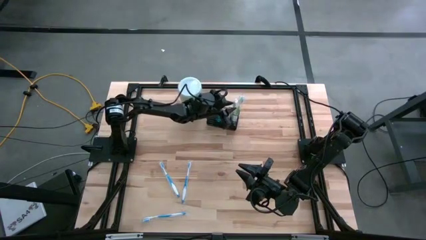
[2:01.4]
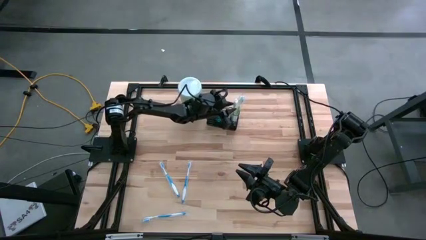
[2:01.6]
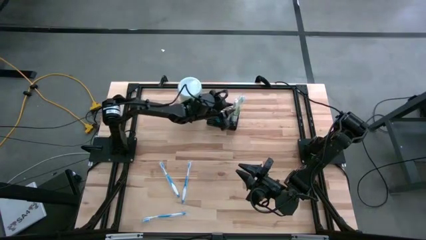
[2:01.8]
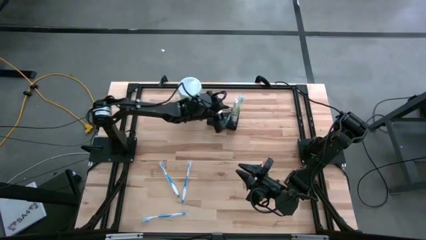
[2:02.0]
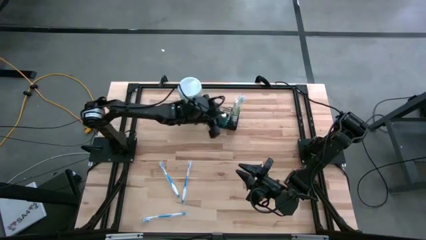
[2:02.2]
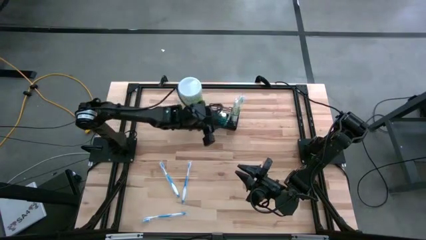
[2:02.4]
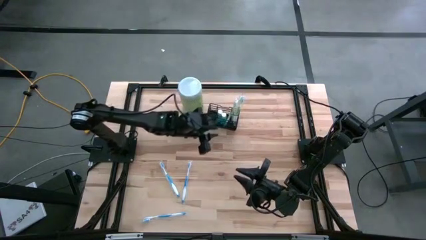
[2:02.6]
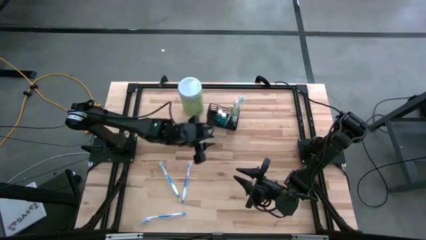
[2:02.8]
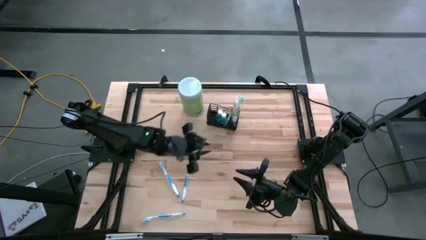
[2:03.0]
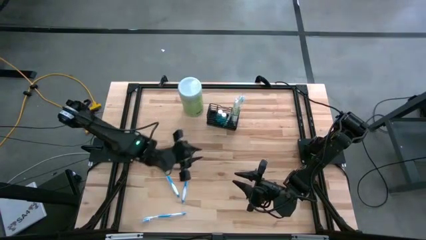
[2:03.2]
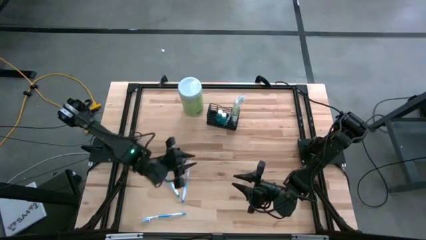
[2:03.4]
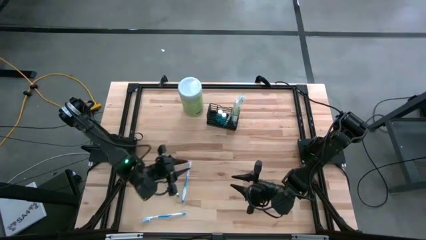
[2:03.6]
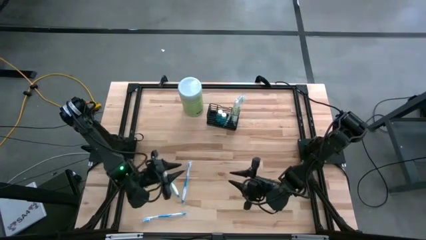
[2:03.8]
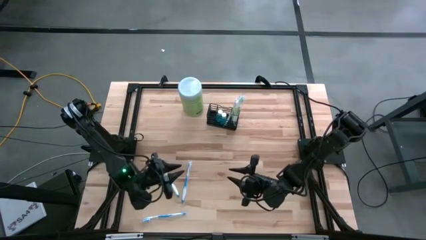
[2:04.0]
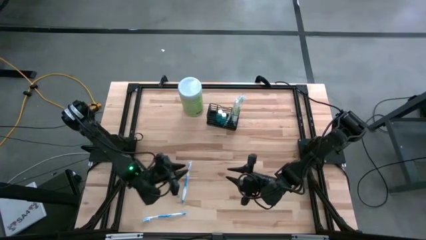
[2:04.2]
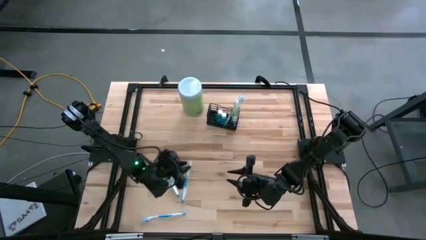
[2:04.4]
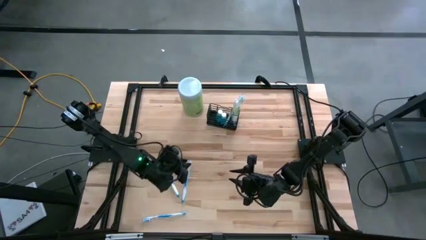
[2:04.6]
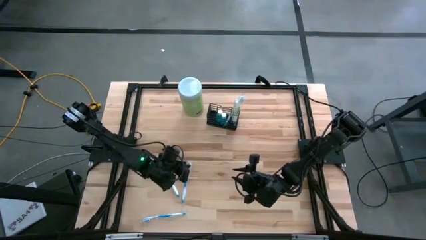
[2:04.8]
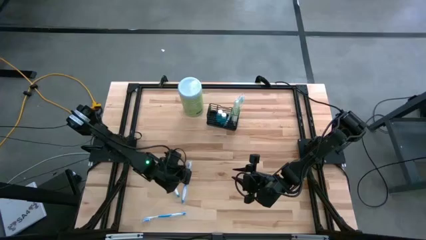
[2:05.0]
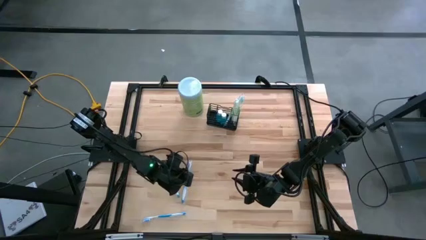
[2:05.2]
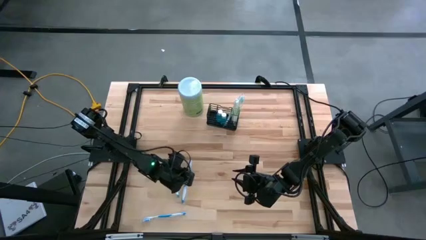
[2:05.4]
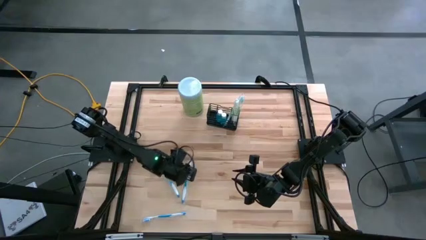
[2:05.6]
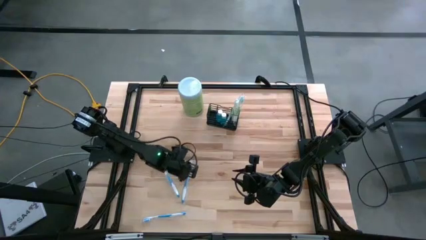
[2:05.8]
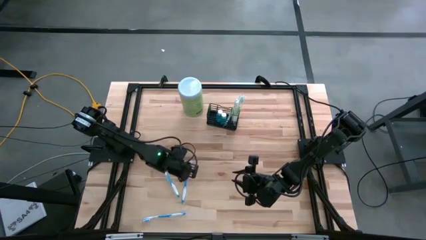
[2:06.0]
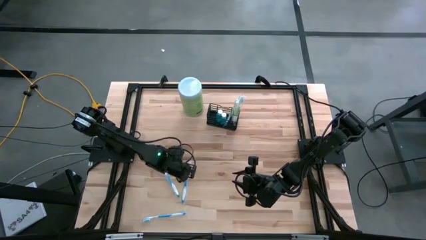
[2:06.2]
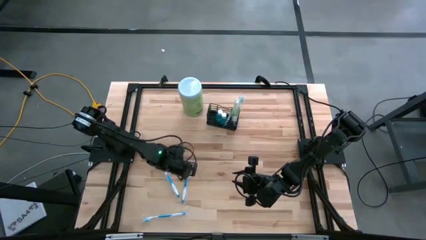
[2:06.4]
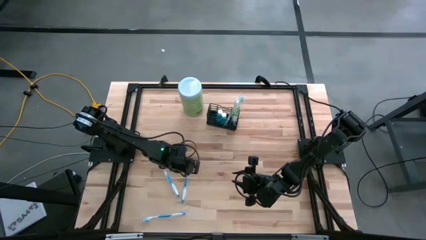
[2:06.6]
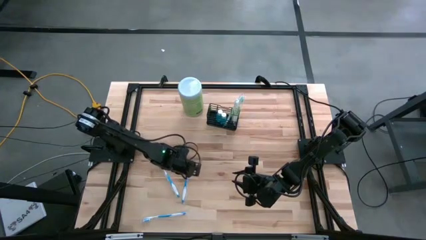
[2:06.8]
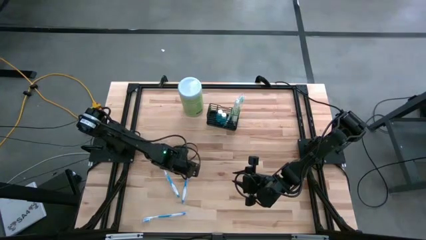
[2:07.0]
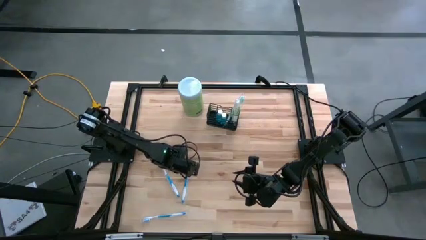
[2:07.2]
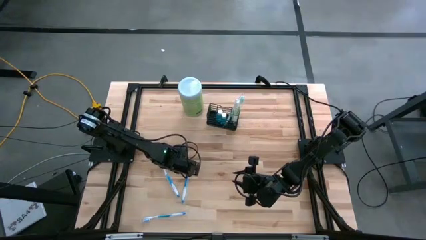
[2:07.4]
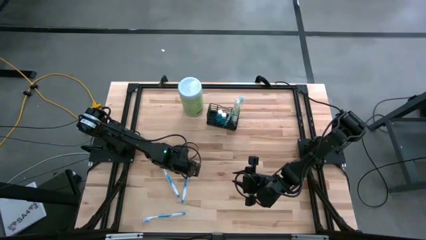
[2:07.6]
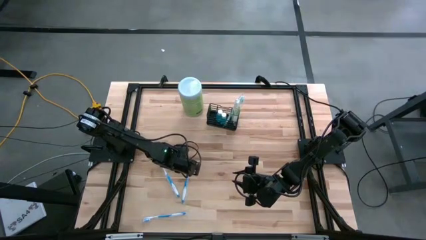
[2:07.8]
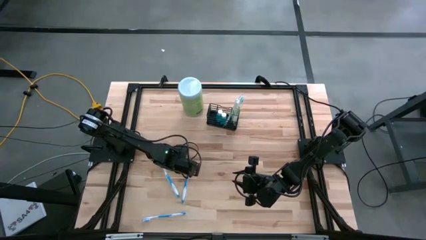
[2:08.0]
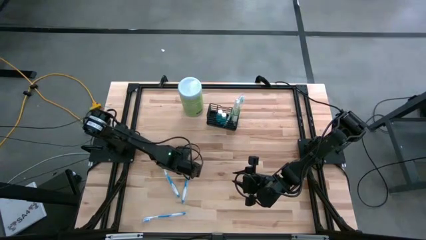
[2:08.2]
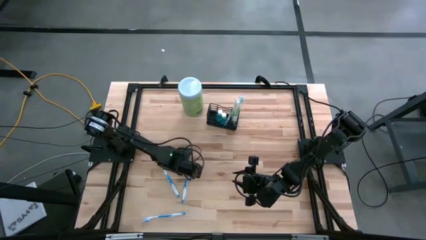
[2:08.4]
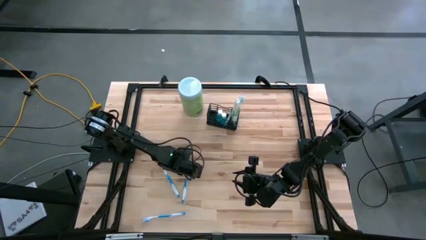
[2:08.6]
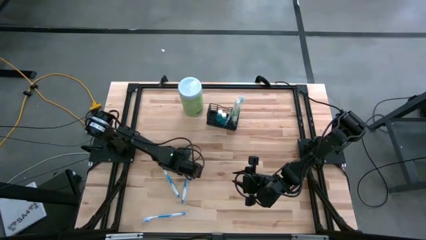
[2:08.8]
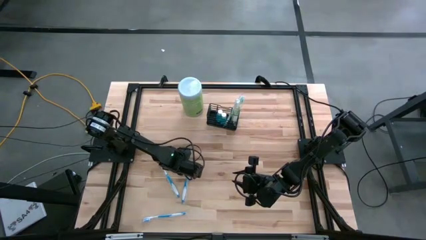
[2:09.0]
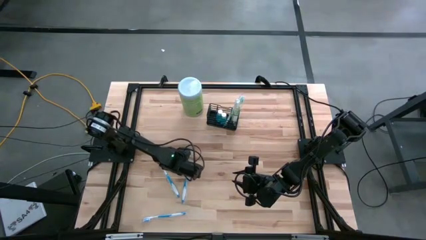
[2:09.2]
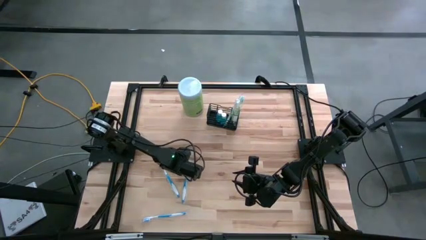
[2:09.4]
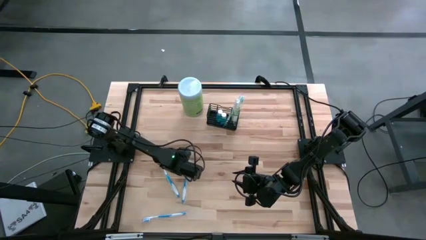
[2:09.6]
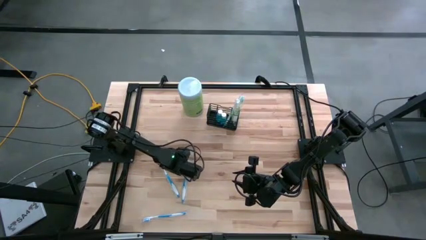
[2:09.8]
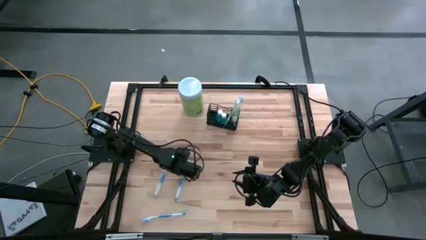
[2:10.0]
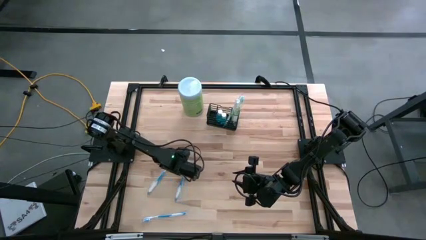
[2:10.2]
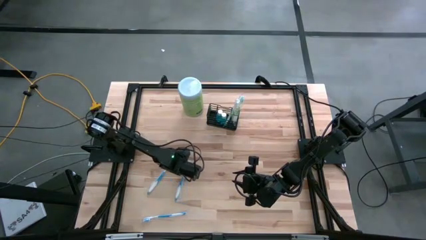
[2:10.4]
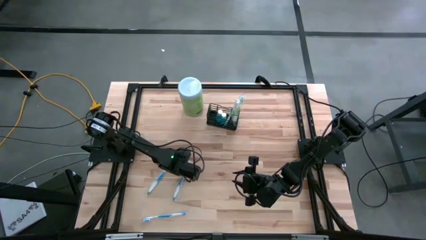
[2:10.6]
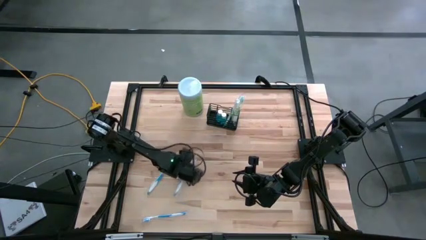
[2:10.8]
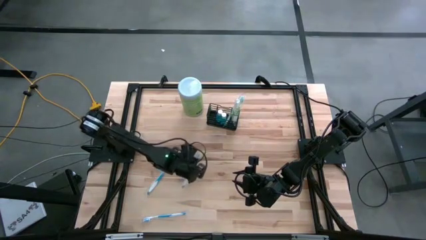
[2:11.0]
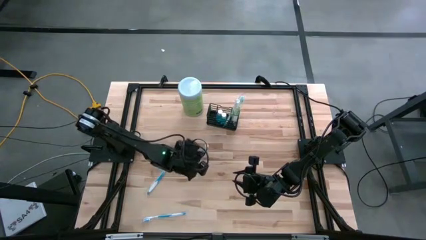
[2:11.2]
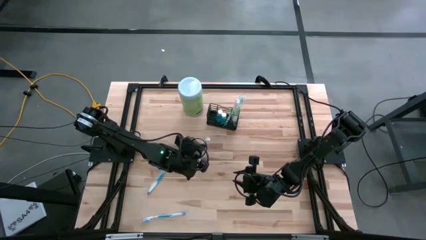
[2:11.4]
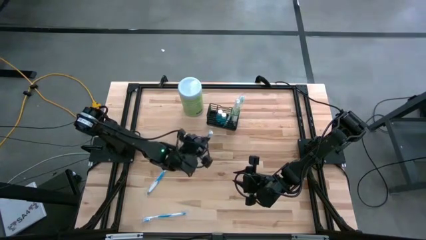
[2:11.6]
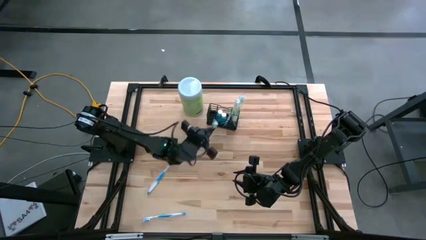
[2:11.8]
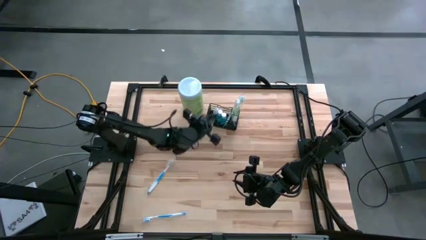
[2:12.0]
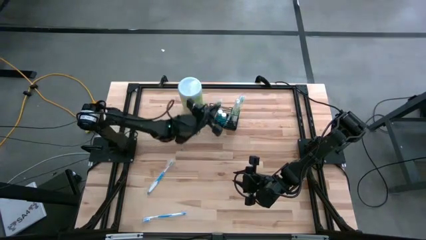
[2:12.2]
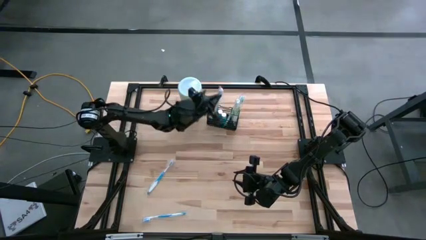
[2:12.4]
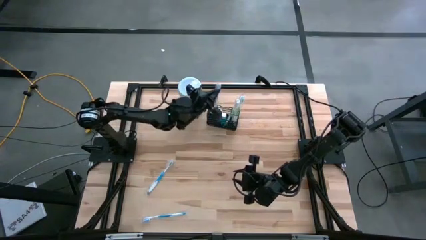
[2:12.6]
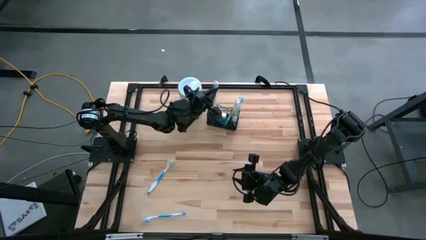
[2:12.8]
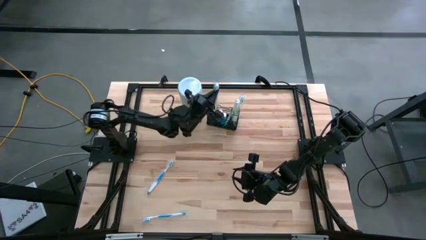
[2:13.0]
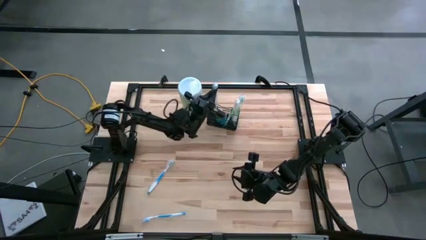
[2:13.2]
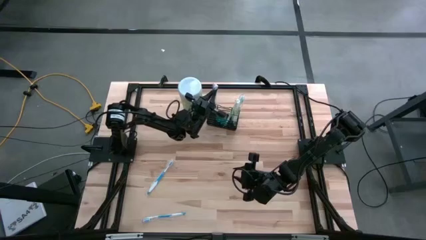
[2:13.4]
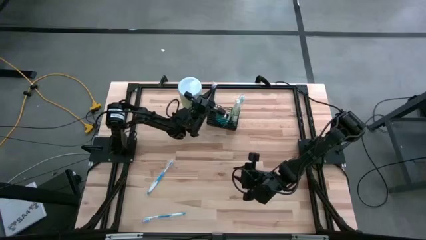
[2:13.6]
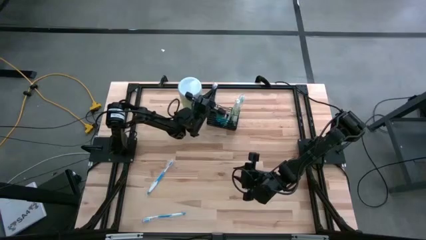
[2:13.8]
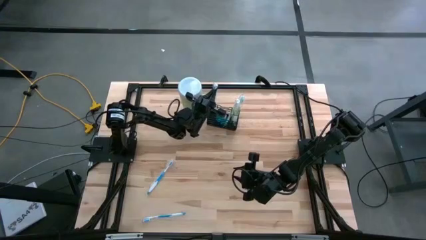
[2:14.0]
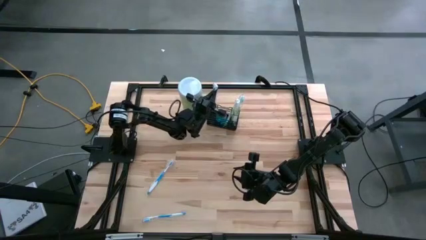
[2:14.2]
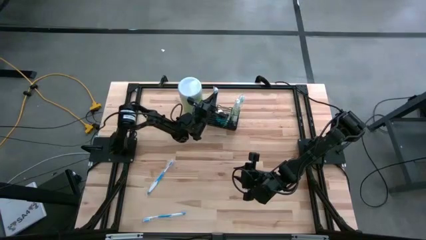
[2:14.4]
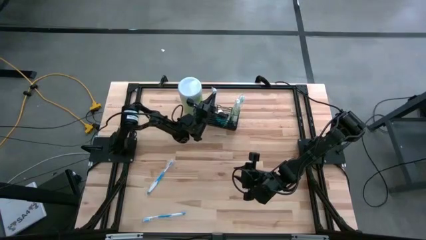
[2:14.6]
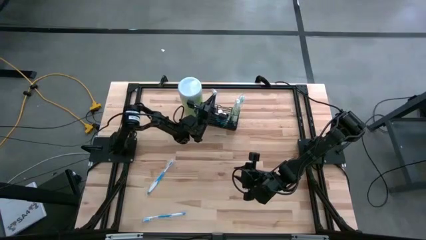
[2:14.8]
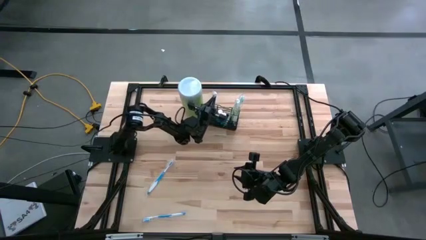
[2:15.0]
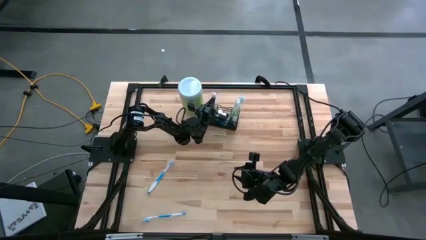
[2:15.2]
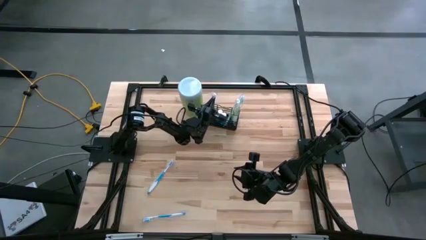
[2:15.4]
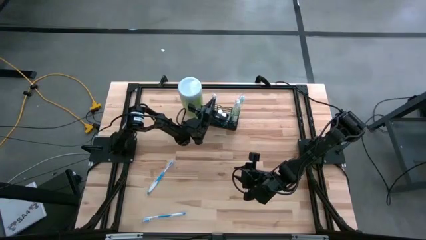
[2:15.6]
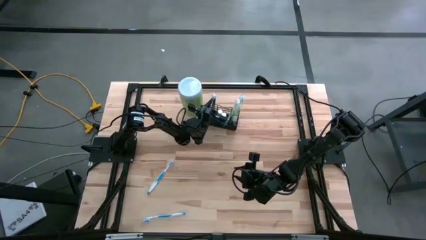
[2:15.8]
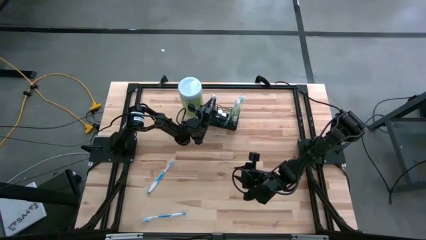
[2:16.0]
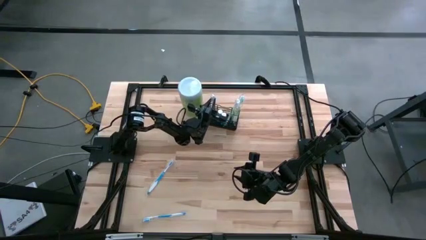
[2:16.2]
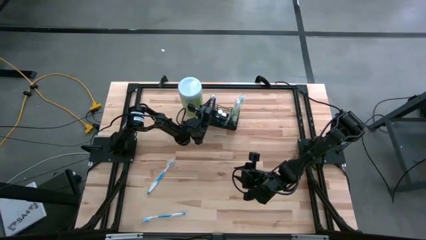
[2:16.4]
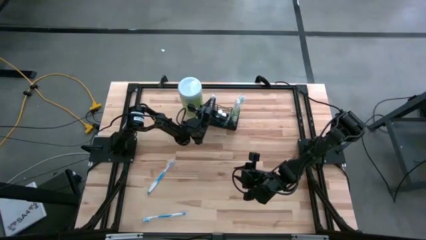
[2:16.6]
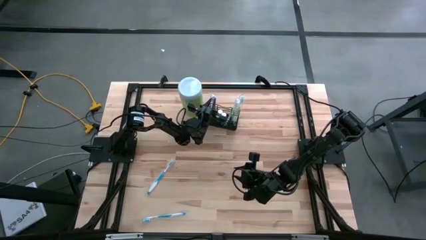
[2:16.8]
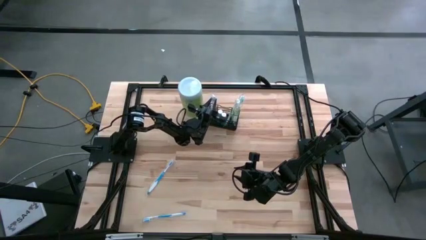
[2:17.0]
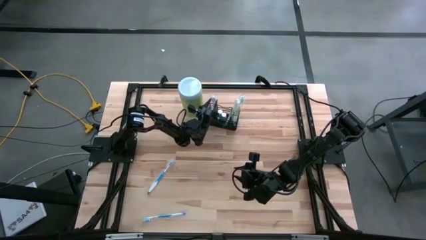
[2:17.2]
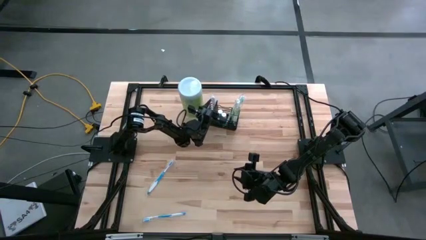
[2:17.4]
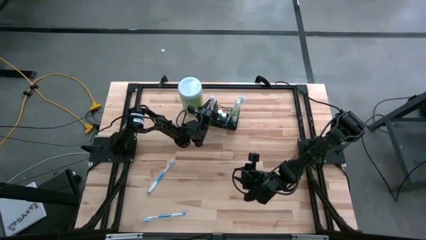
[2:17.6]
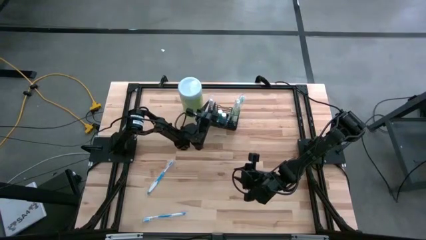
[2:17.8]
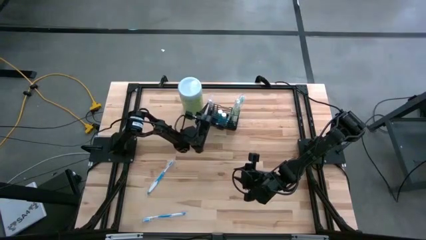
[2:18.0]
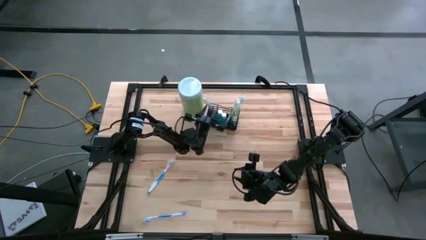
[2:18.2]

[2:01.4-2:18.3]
Task: Pick & Place toothbrushing station
Put the top right blue toothbrush into the mesh organizer
